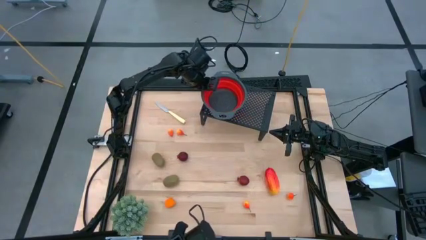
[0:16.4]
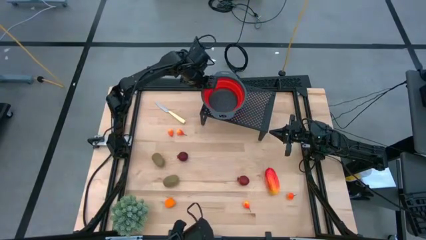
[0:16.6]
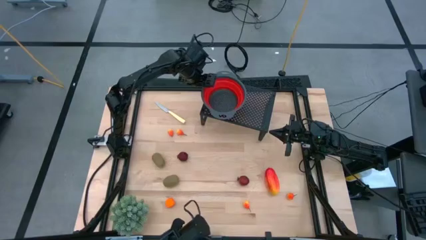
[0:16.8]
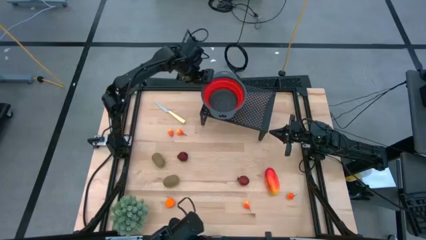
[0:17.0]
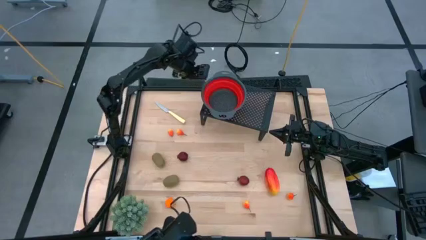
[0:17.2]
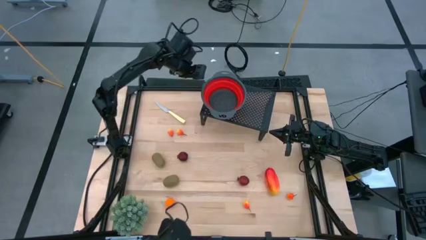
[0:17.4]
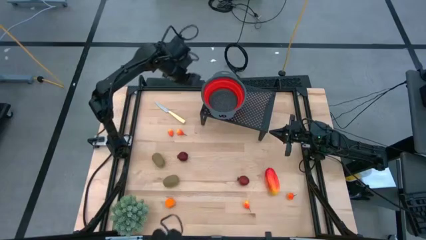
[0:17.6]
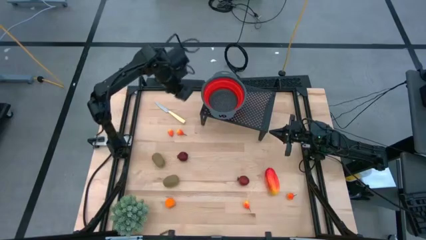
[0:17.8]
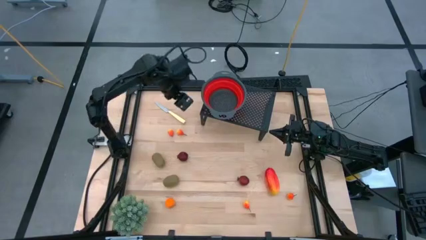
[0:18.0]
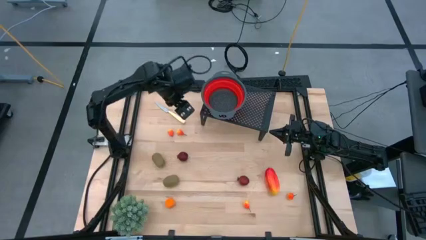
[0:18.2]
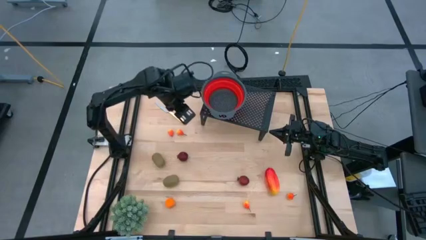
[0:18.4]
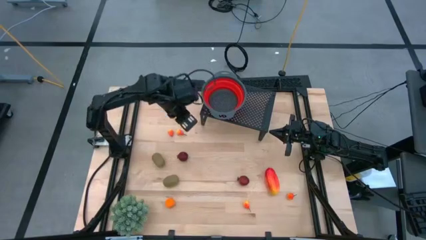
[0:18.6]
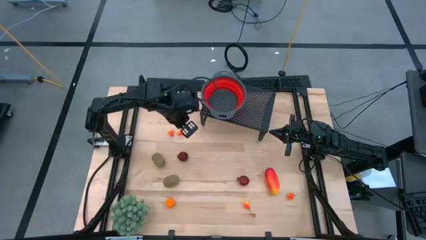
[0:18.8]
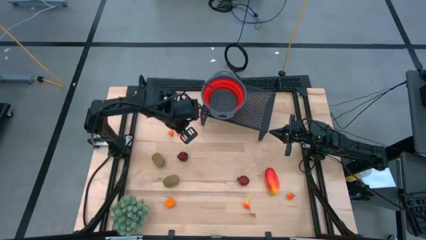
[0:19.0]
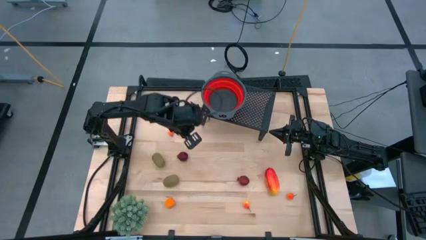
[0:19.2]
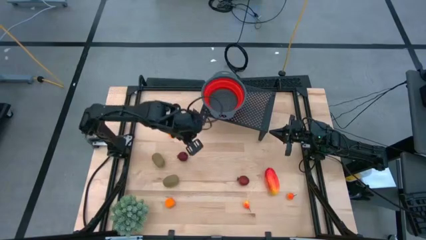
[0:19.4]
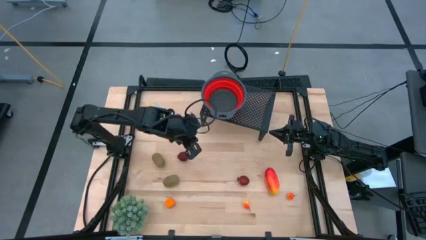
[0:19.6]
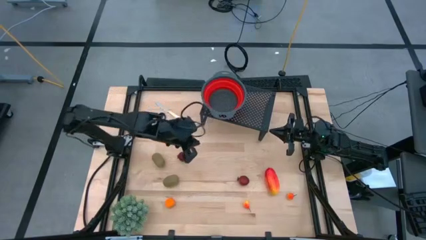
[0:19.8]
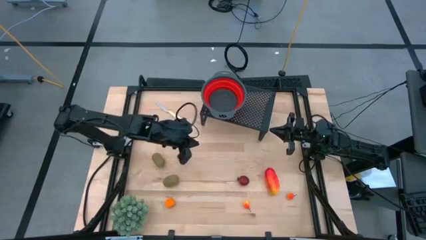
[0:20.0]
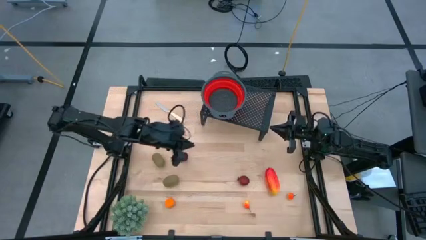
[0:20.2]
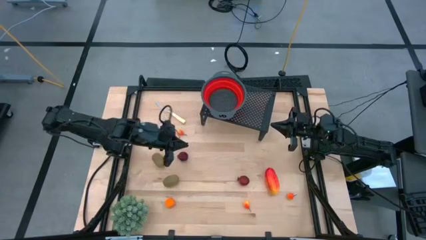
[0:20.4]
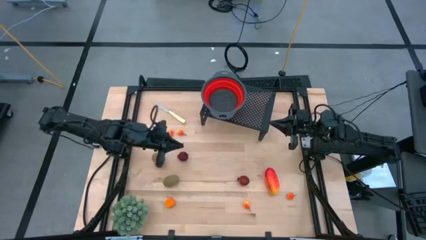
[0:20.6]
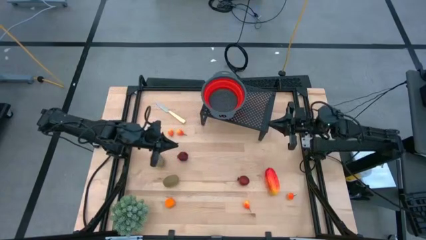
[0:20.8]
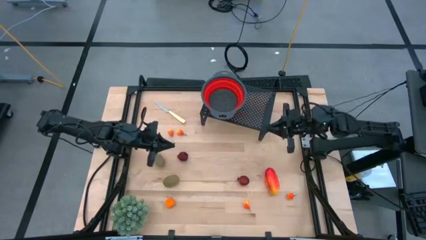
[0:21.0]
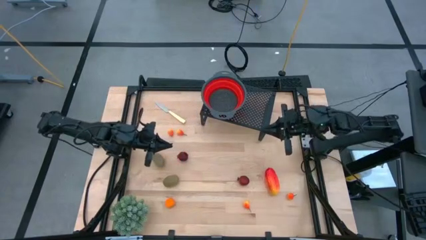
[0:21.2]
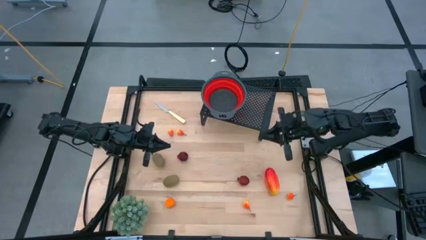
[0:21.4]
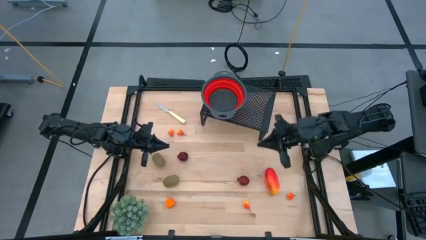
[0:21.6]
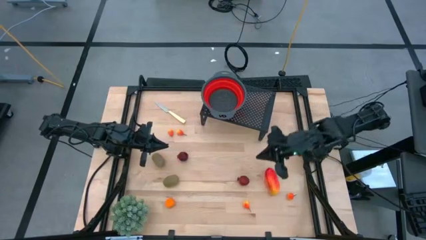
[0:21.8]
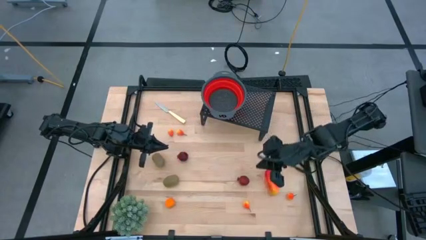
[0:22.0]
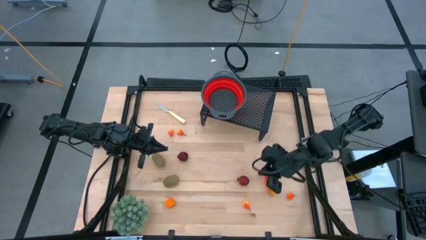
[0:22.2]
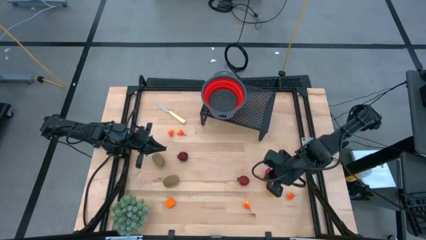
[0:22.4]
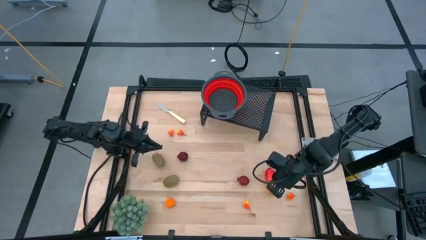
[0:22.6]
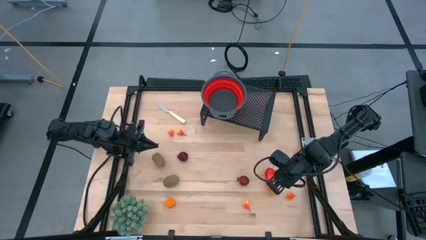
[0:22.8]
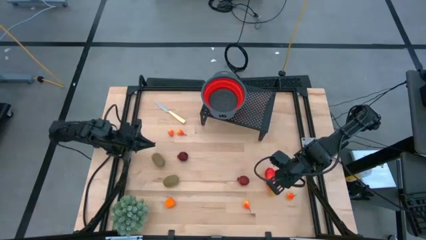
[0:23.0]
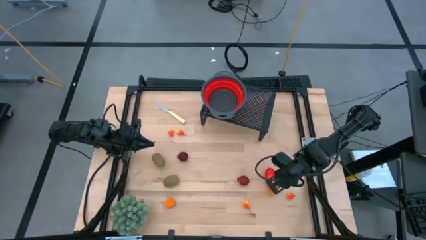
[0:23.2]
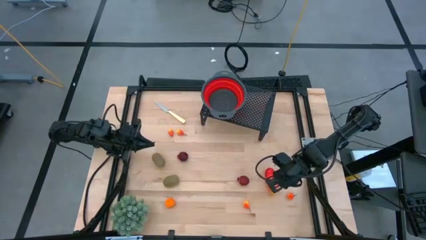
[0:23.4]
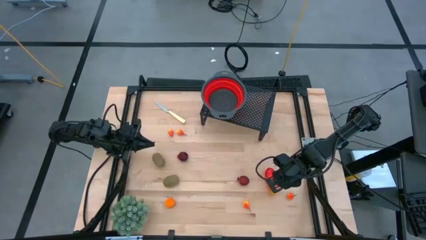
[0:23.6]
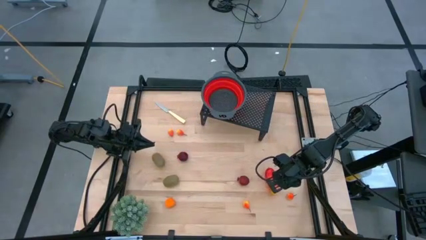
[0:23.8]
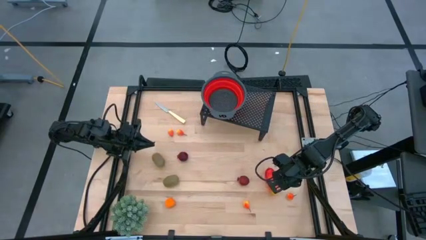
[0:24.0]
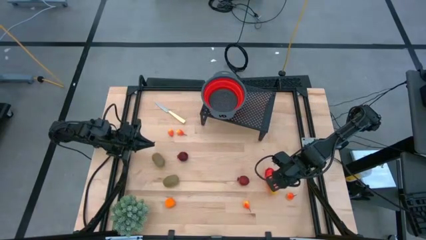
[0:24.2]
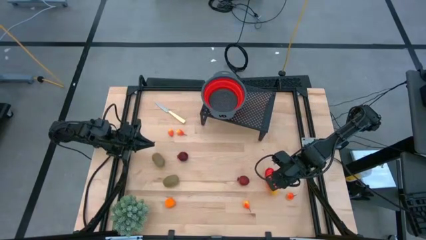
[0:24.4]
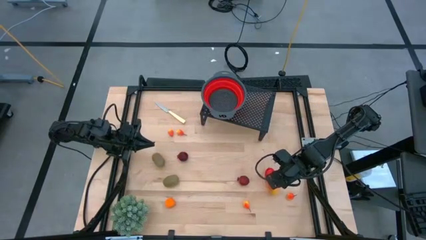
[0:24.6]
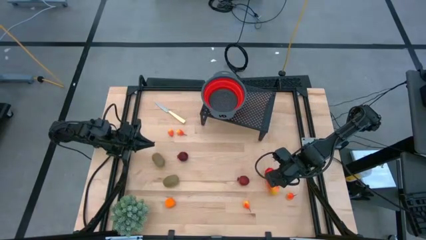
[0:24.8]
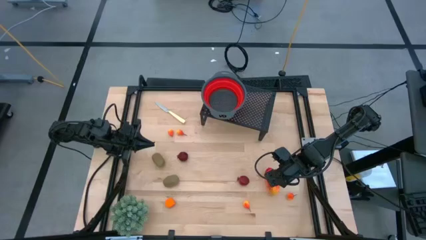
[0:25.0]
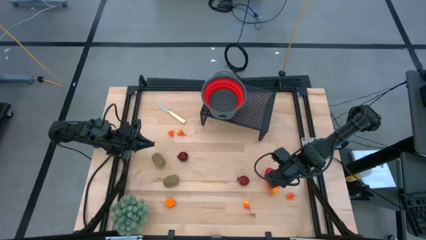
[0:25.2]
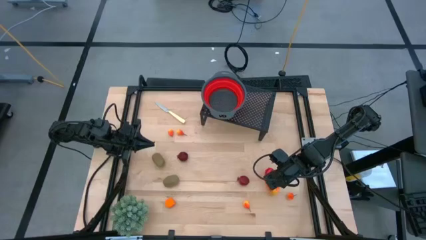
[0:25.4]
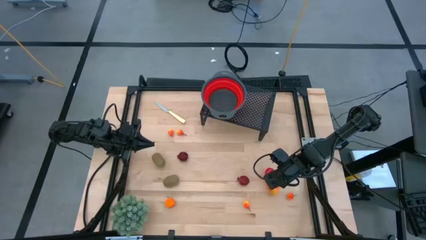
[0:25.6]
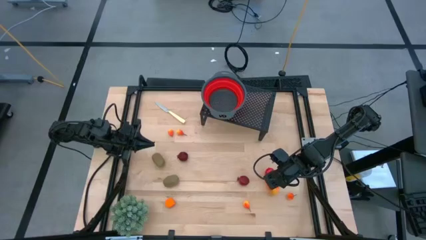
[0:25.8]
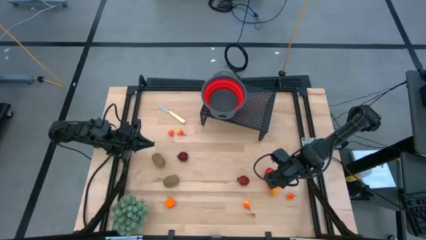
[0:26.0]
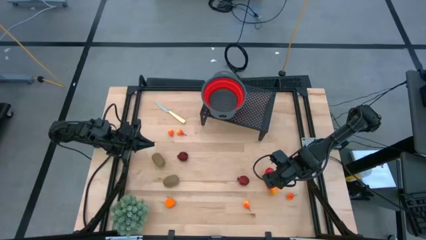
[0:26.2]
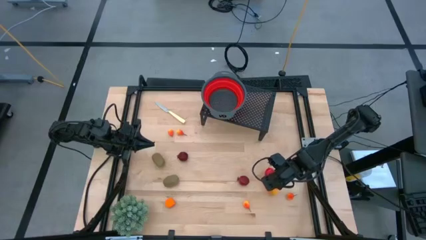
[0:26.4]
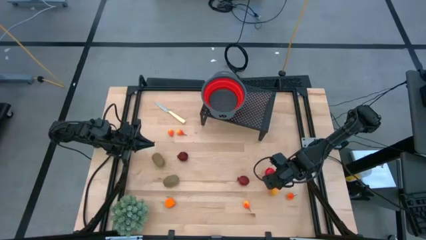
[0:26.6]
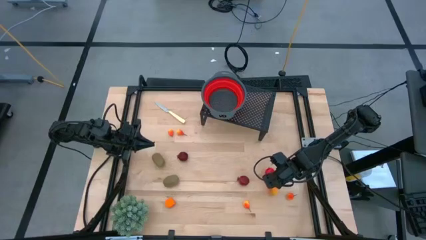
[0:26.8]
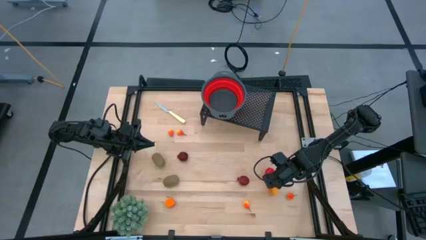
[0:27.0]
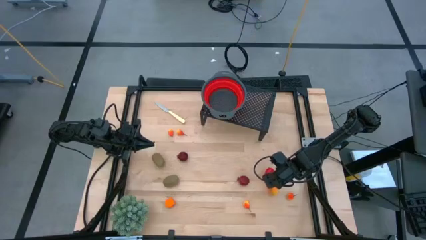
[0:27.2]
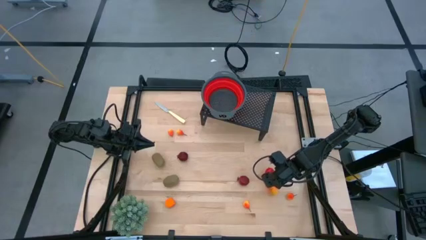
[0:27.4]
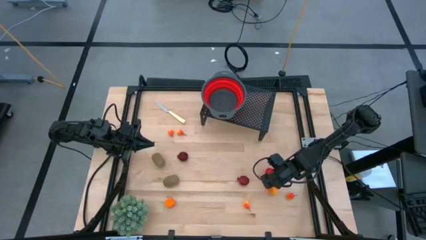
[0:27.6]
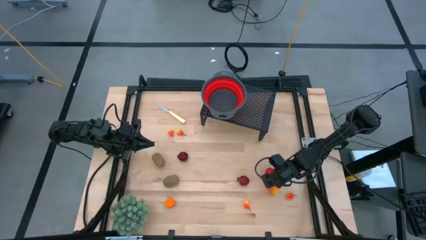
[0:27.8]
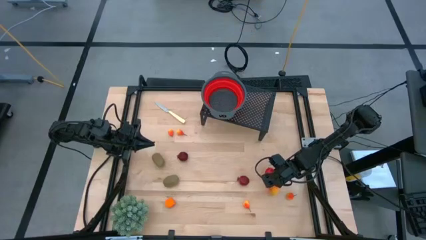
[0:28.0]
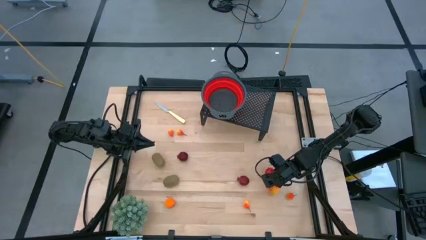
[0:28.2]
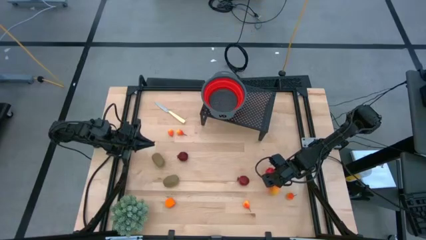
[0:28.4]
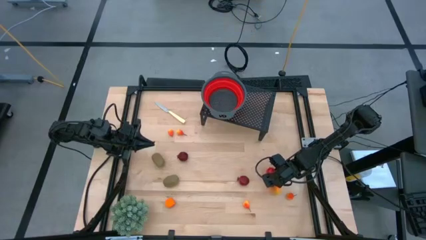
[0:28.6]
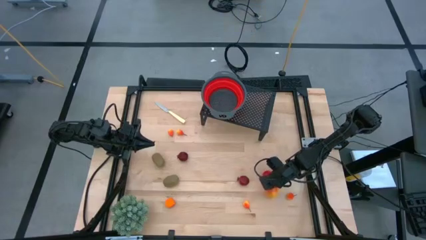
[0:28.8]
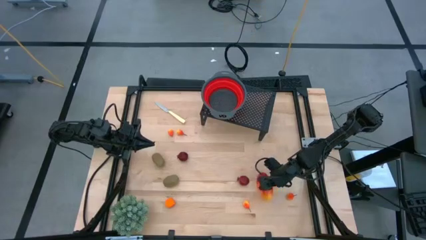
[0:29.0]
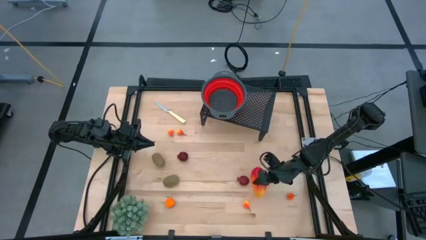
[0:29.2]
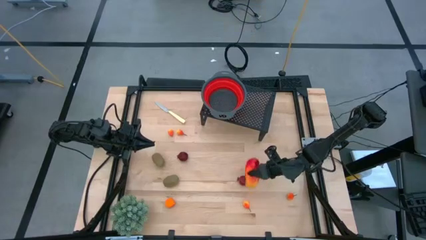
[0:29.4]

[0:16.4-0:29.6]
Task: Pick & Place Fruit
Put the mango into the strainer bowl on the shelf
